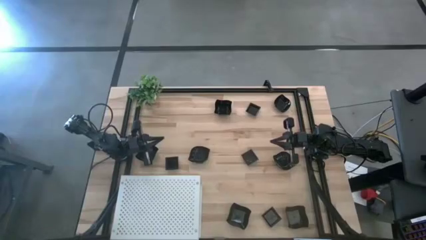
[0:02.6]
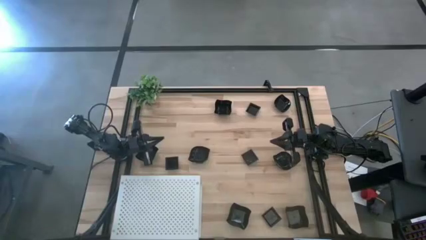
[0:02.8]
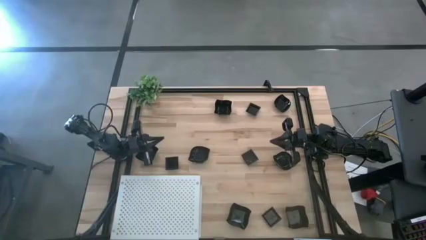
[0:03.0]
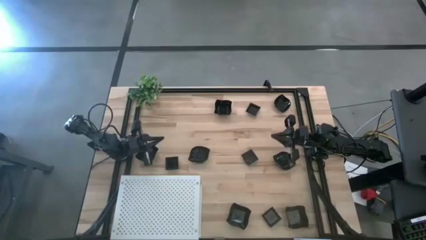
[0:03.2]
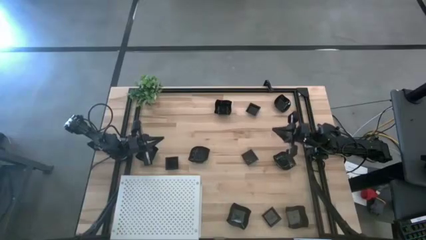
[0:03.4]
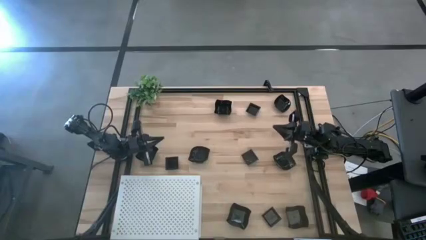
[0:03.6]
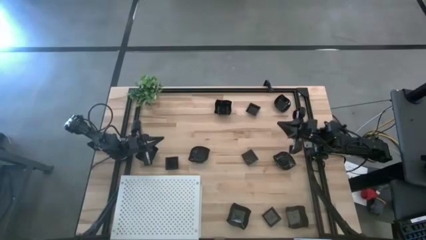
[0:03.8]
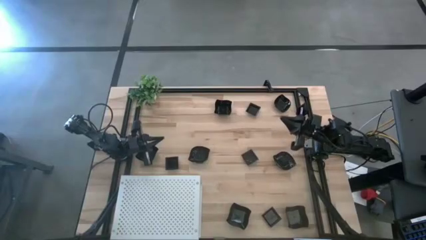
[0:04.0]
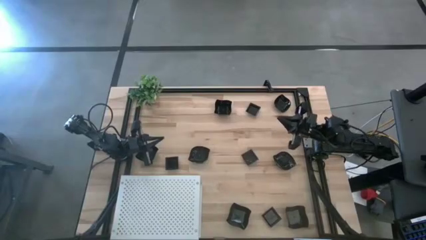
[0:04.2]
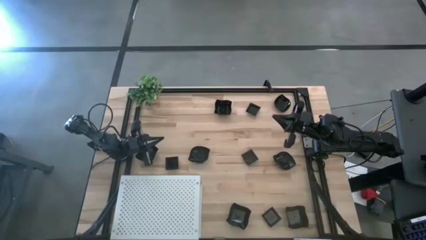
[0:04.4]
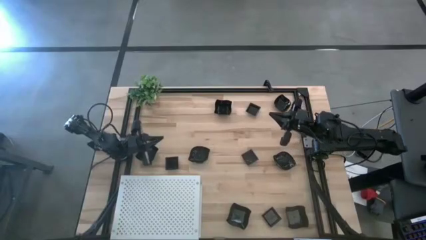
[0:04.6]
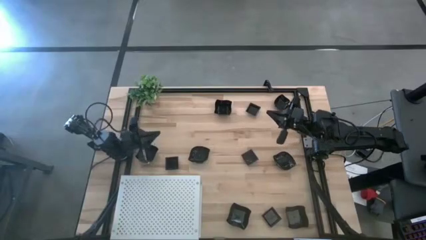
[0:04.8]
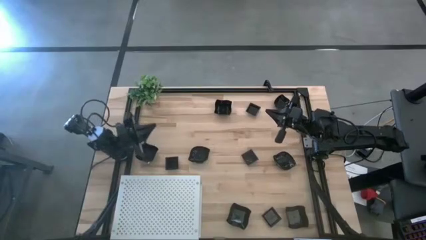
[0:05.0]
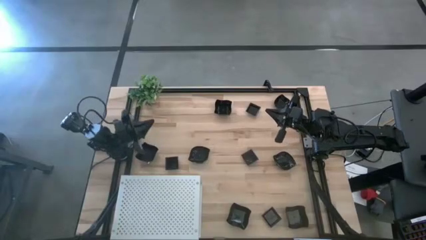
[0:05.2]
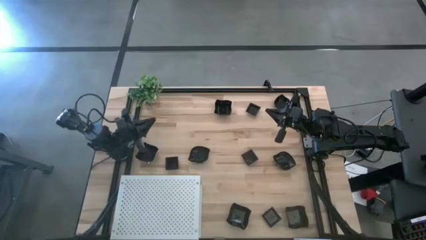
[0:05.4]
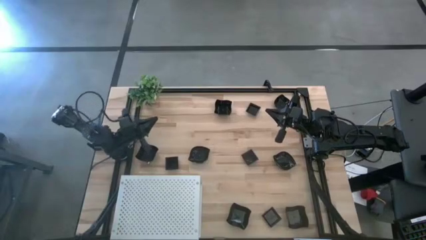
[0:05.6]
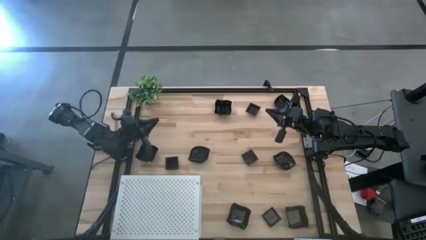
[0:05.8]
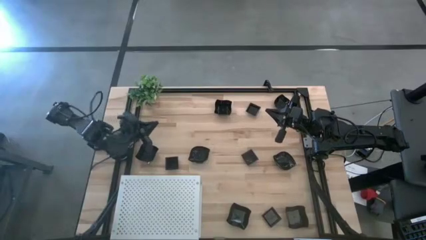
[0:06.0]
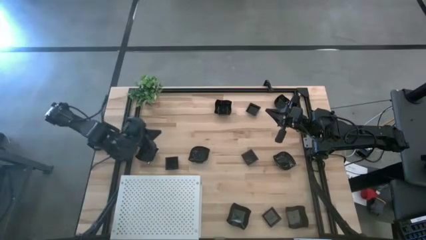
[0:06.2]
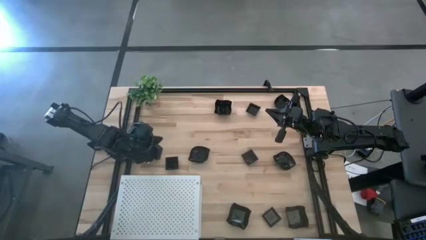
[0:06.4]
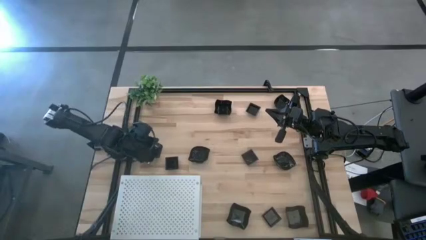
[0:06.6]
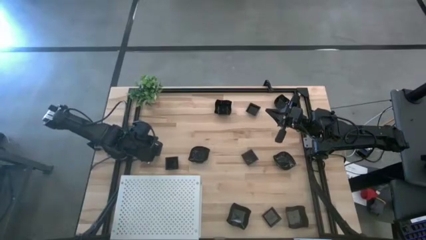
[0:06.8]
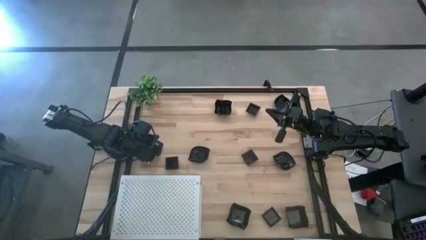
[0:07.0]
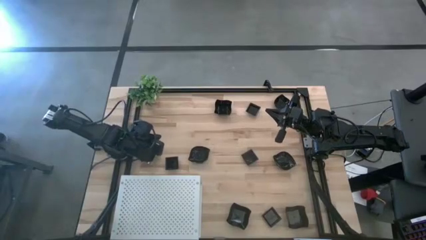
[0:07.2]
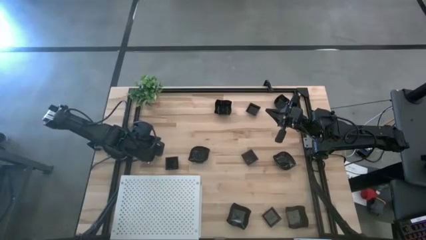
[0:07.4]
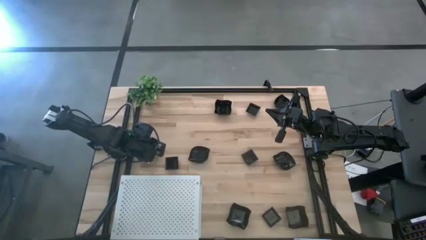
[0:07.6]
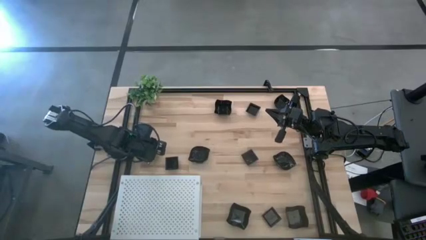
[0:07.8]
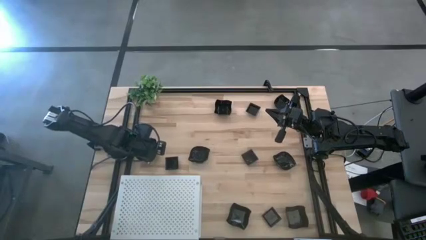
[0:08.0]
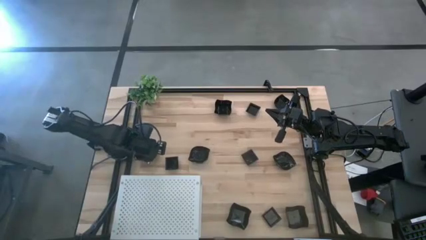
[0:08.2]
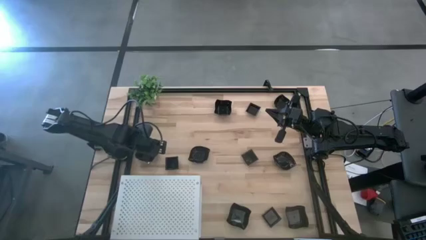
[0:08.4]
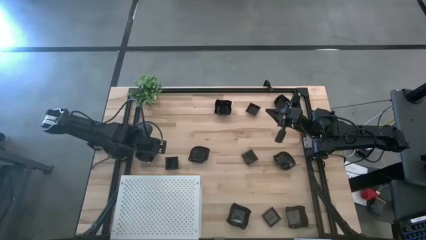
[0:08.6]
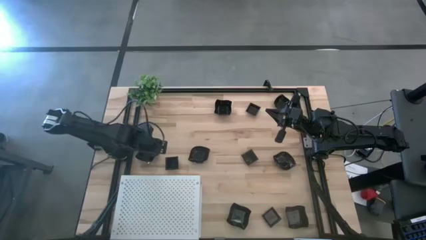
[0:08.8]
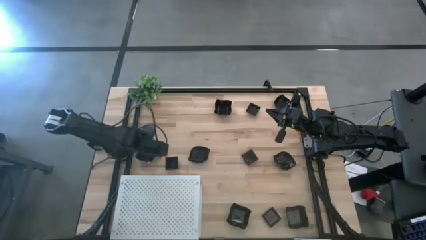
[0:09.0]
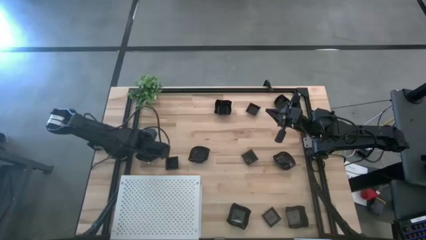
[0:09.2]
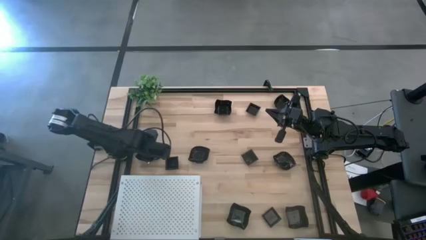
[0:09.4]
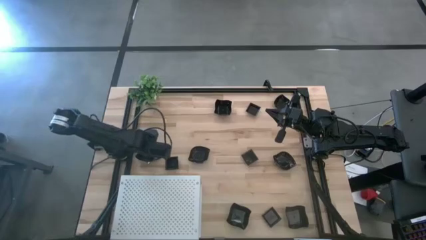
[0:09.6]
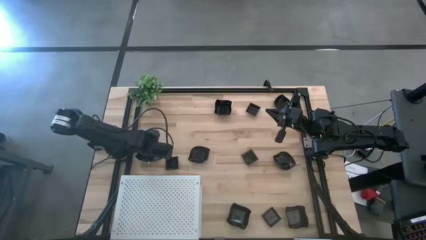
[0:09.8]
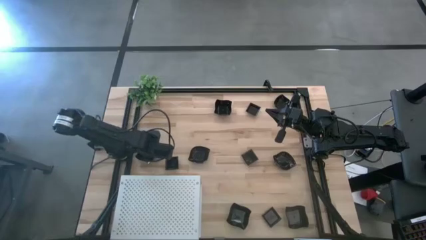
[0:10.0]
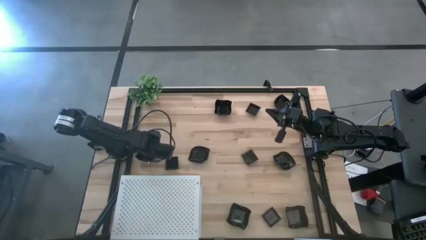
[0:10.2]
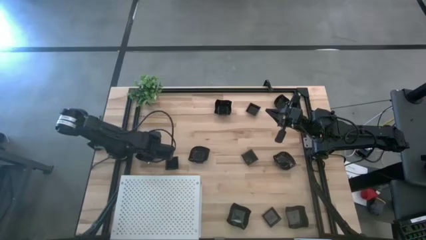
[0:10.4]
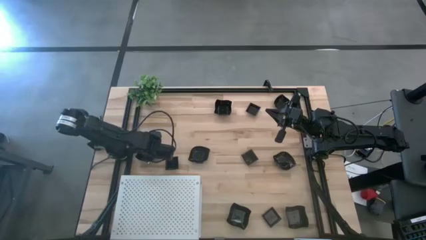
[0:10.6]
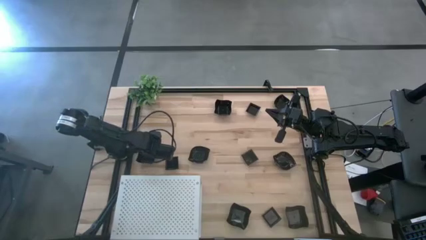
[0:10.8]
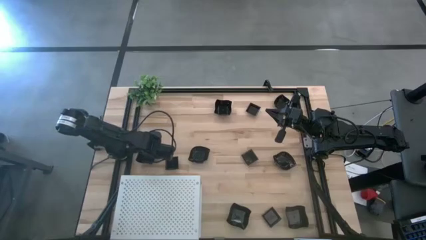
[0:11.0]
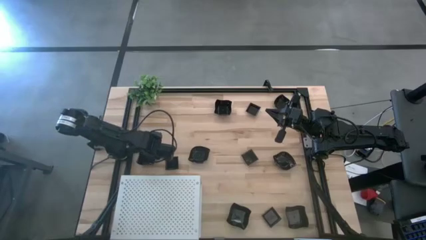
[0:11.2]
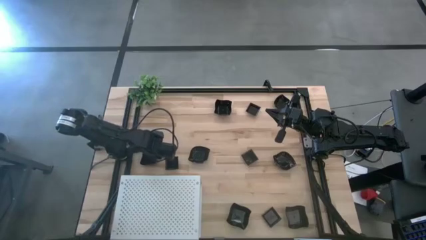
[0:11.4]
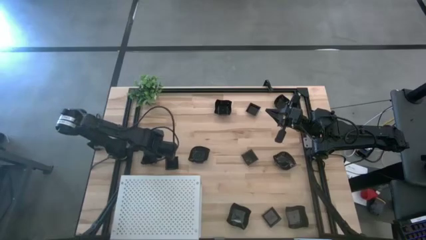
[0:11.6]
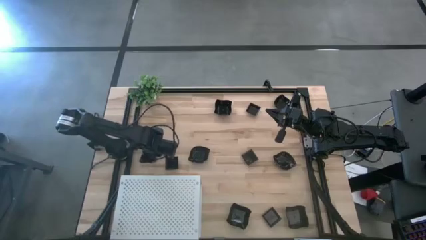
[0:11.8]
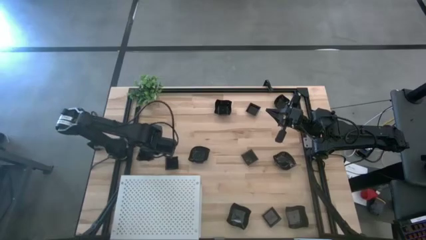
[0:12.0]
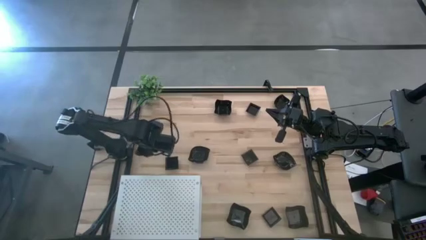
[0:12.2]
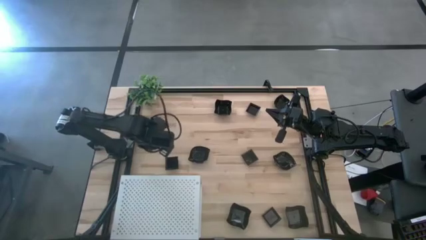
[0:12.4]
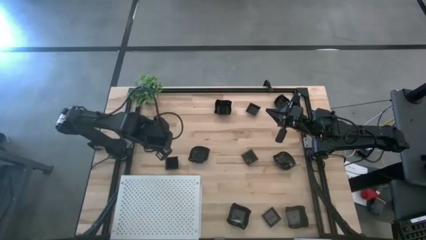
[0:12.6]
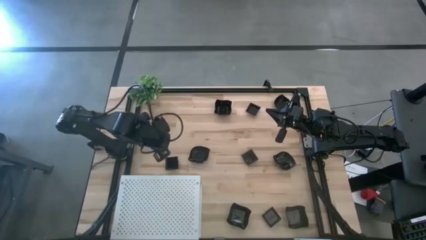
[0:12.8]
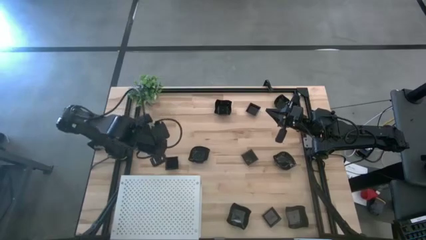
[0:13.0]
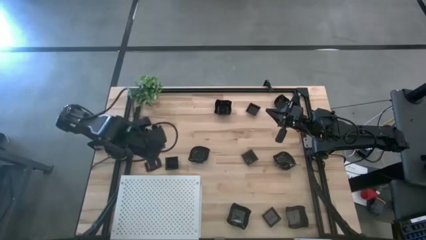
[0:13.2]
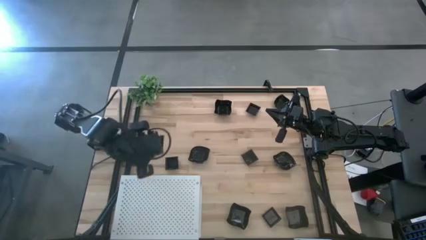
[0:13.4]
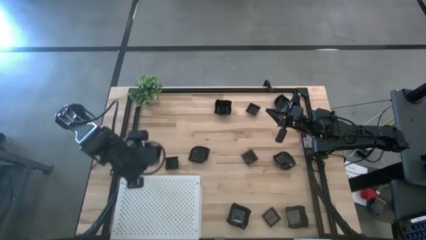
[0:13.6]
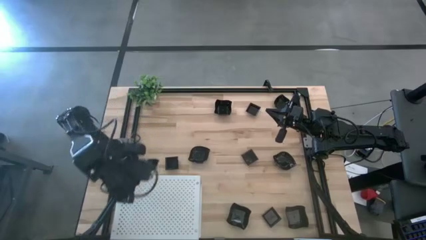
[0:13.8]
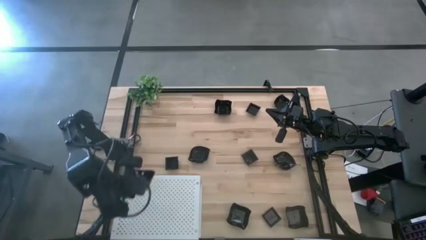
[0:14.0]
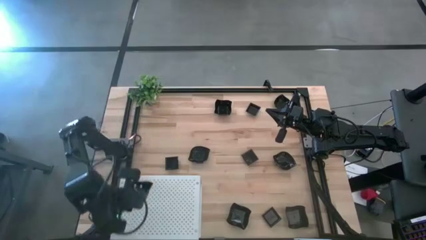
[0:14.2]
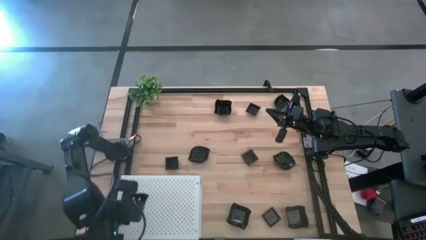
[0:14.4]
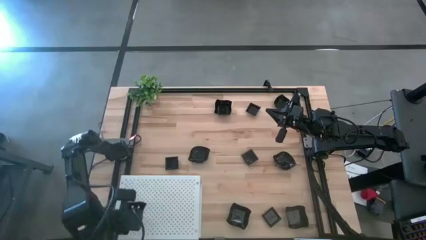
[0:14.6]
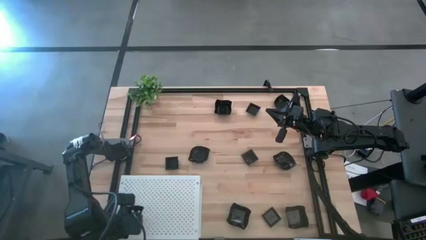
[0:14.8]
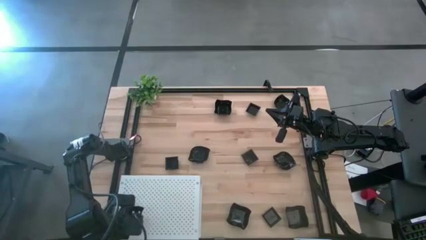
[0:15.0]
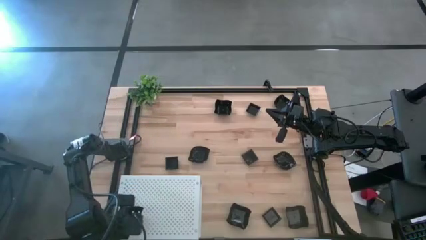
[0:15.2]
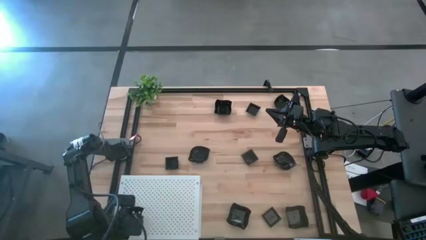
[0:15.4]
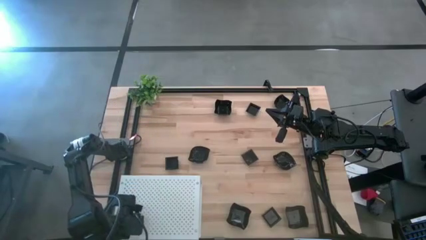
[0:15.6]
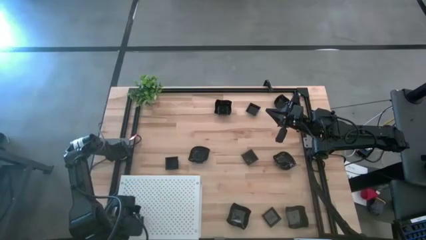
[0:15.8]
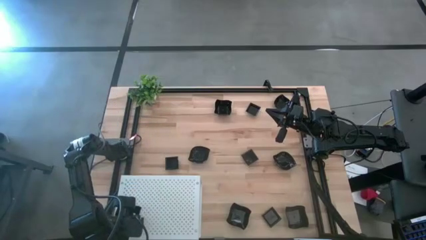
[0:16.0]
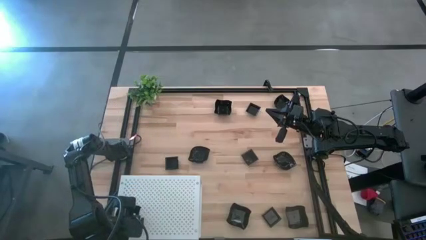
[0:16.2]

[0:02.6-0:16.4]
Task: Pick & Place Mini shaped plates
Put the distorted square plate on the shelf
